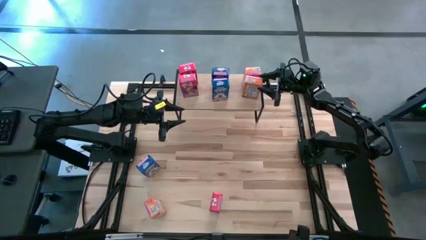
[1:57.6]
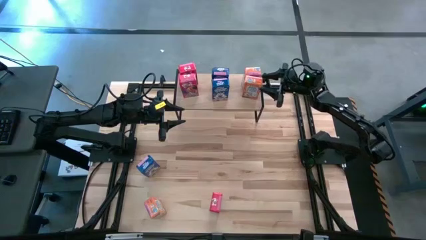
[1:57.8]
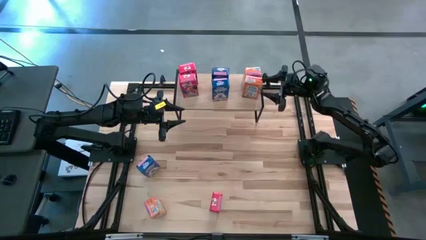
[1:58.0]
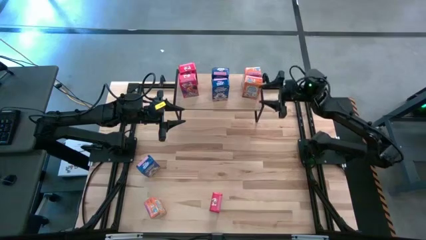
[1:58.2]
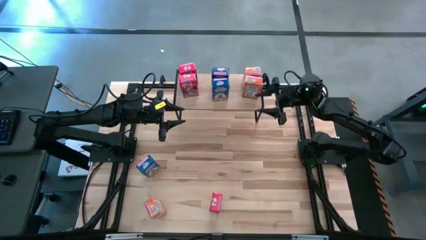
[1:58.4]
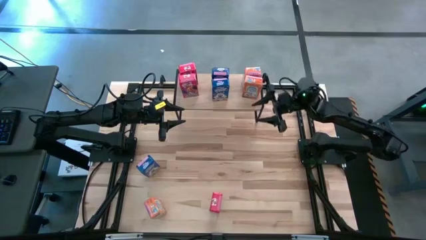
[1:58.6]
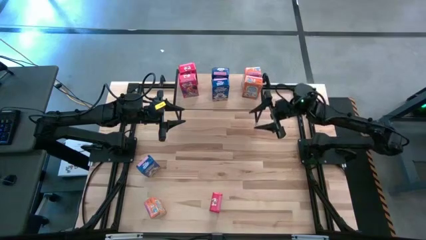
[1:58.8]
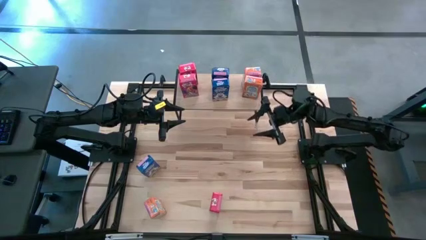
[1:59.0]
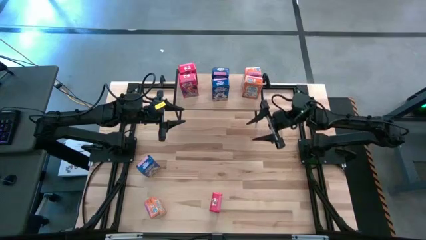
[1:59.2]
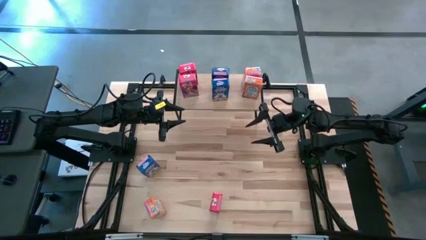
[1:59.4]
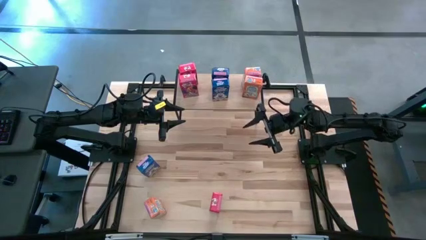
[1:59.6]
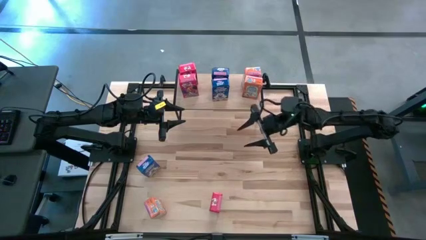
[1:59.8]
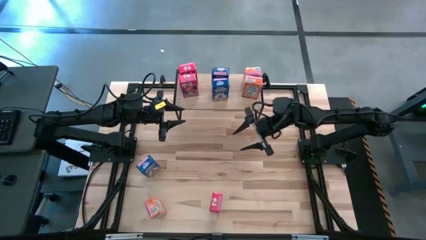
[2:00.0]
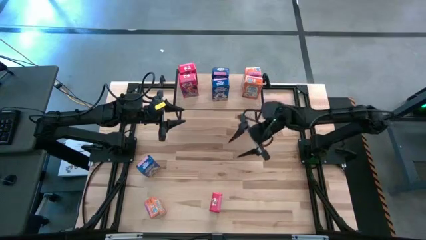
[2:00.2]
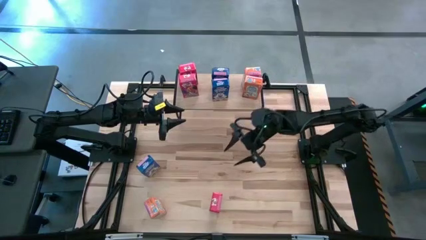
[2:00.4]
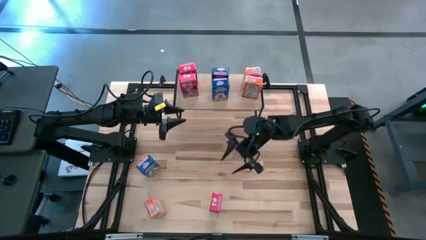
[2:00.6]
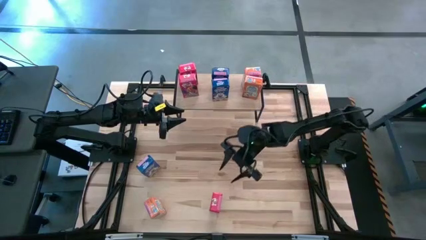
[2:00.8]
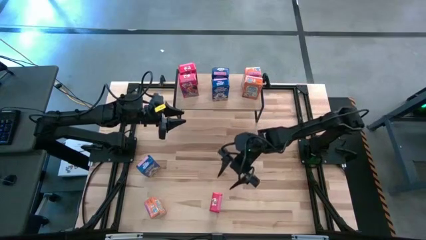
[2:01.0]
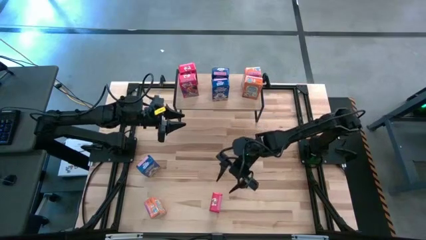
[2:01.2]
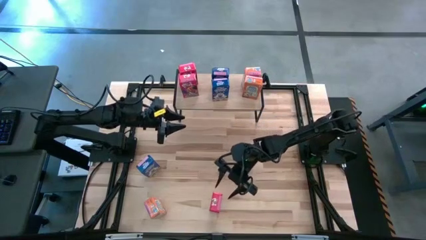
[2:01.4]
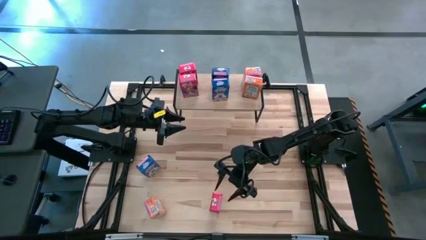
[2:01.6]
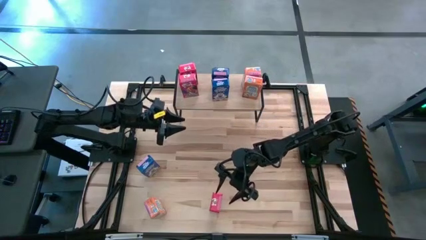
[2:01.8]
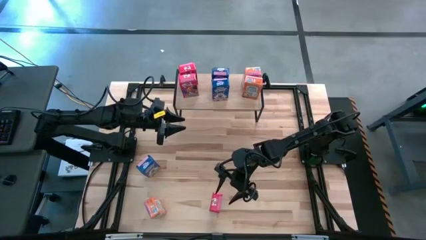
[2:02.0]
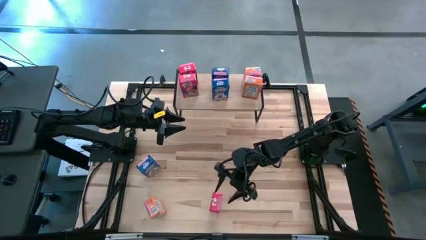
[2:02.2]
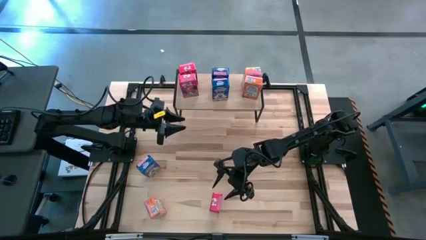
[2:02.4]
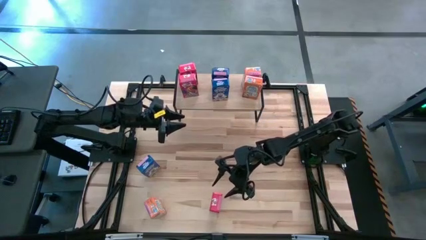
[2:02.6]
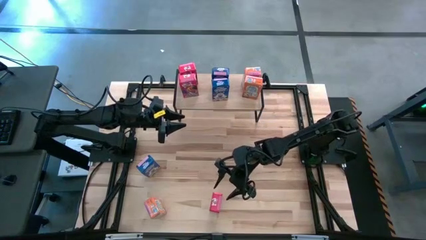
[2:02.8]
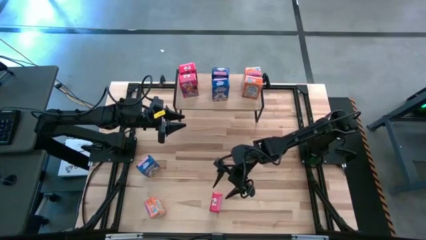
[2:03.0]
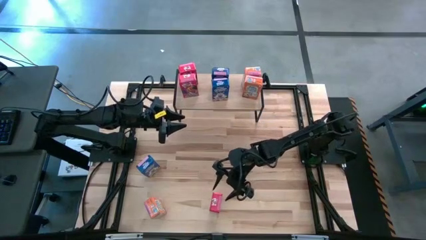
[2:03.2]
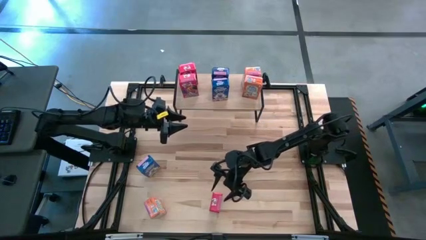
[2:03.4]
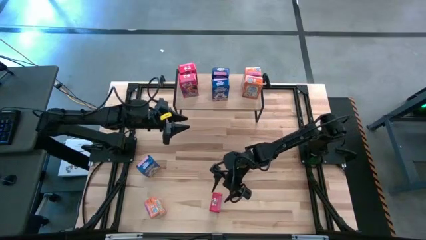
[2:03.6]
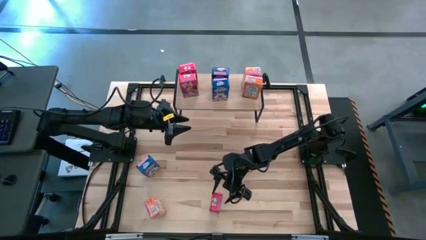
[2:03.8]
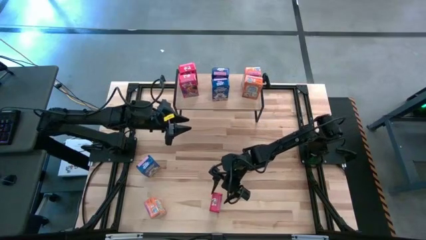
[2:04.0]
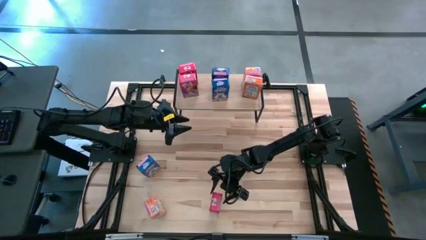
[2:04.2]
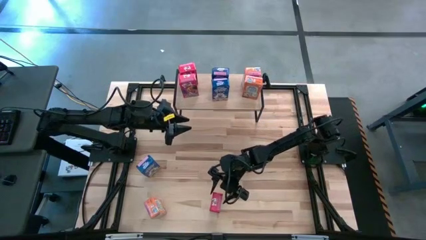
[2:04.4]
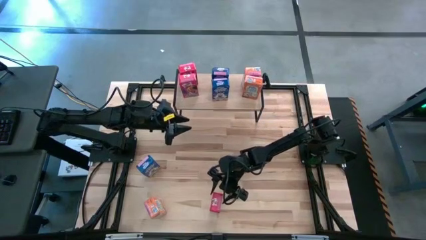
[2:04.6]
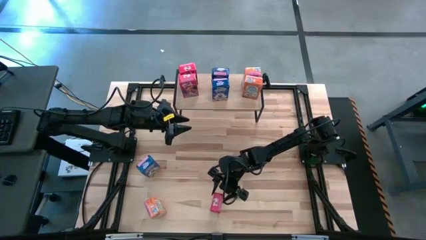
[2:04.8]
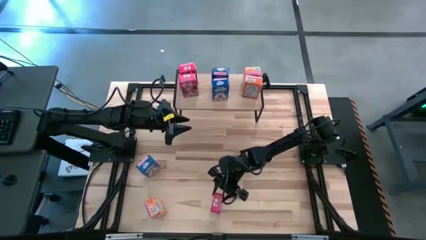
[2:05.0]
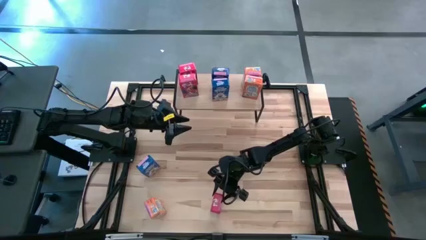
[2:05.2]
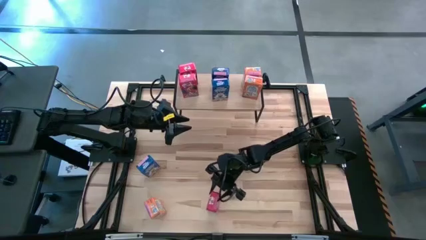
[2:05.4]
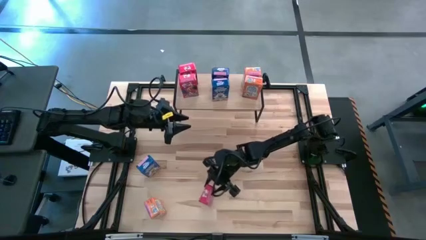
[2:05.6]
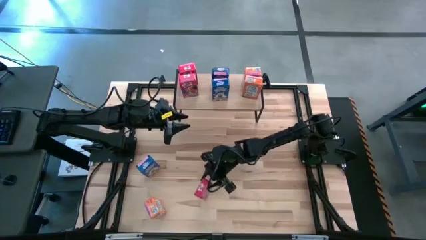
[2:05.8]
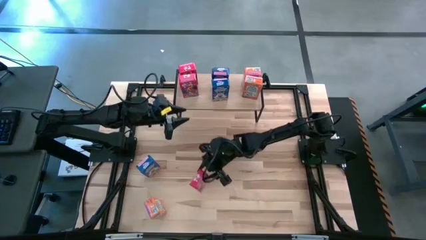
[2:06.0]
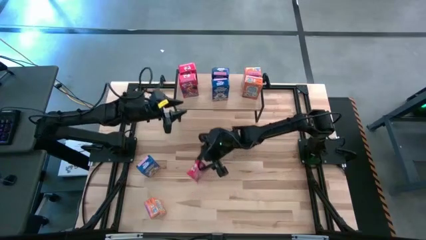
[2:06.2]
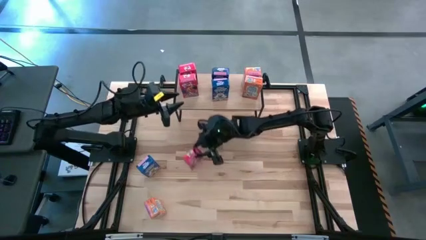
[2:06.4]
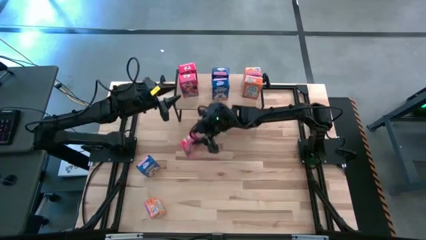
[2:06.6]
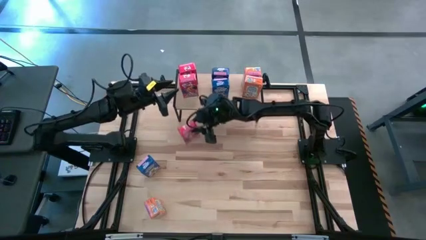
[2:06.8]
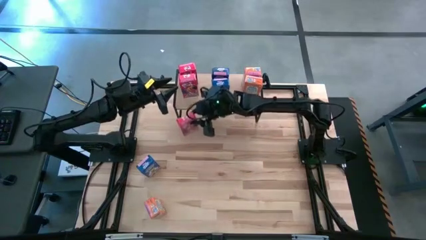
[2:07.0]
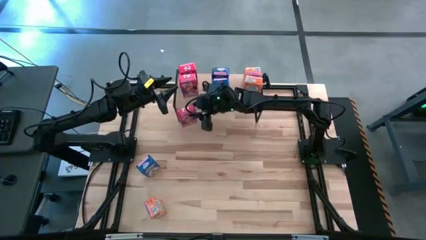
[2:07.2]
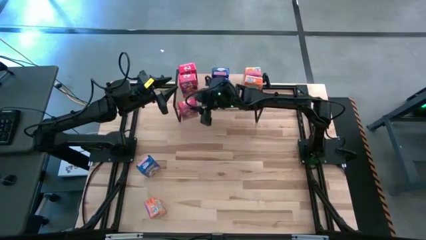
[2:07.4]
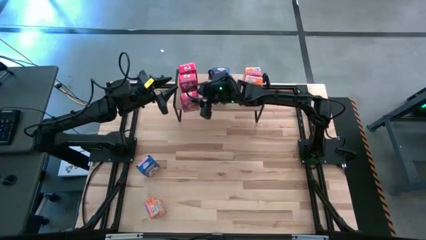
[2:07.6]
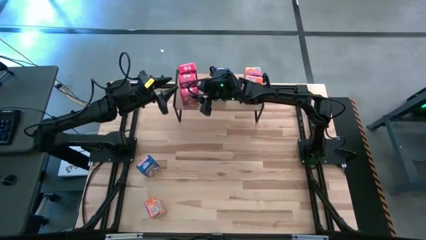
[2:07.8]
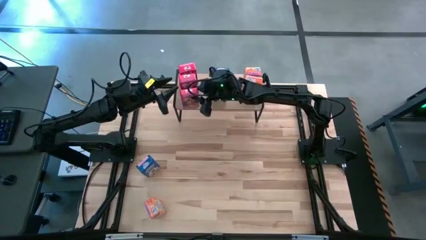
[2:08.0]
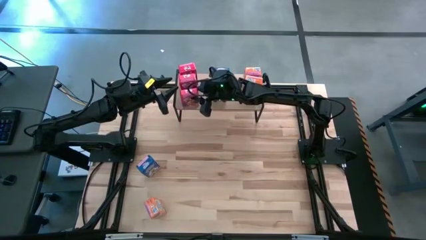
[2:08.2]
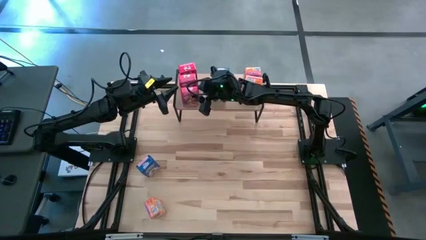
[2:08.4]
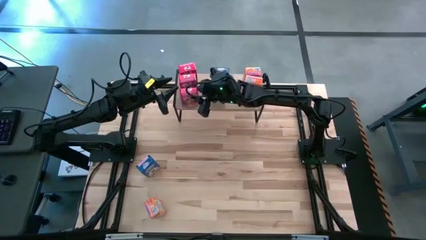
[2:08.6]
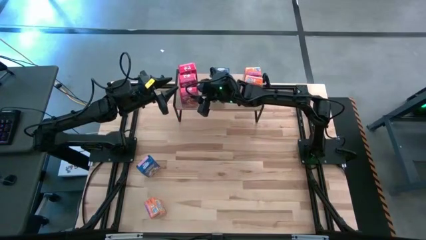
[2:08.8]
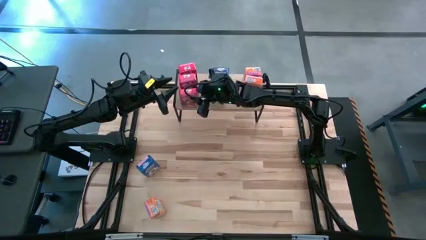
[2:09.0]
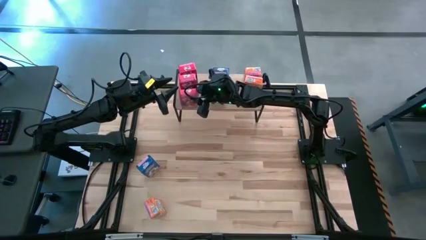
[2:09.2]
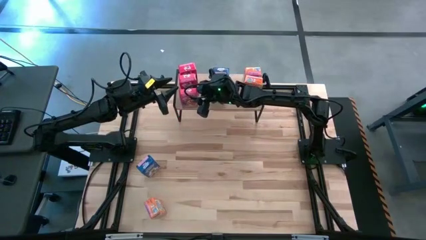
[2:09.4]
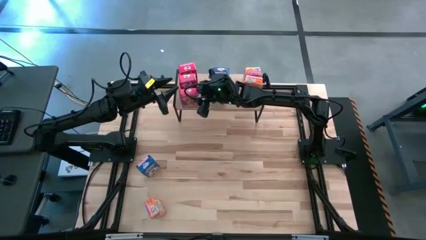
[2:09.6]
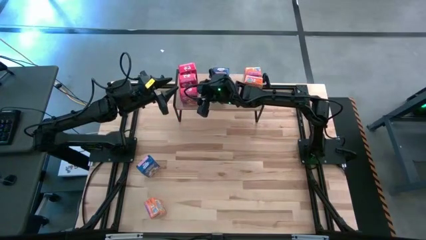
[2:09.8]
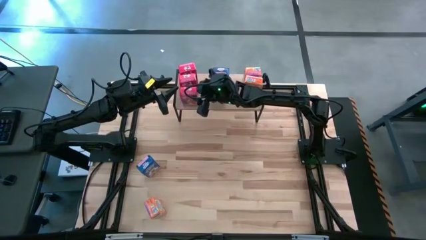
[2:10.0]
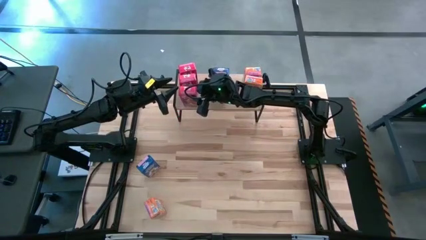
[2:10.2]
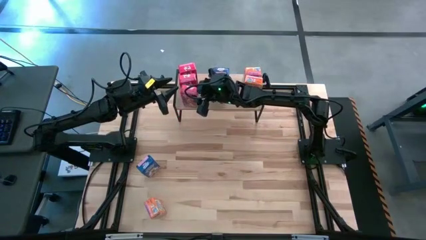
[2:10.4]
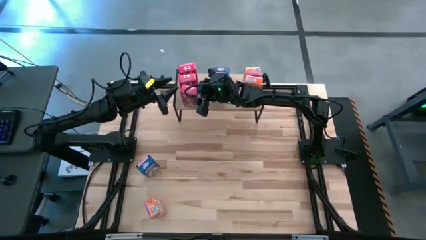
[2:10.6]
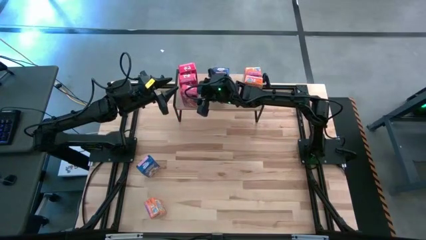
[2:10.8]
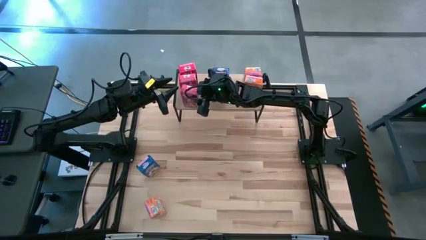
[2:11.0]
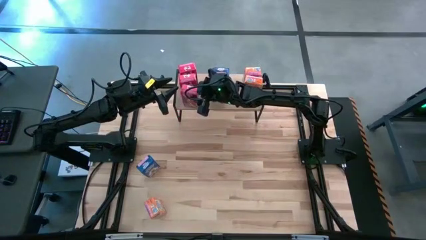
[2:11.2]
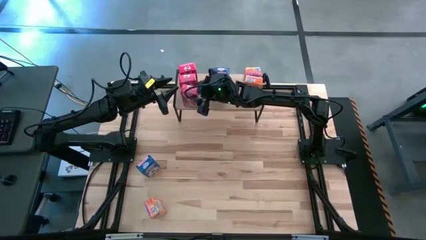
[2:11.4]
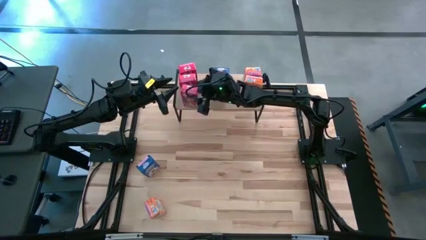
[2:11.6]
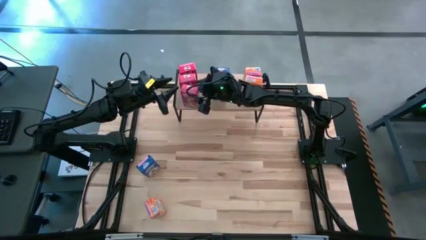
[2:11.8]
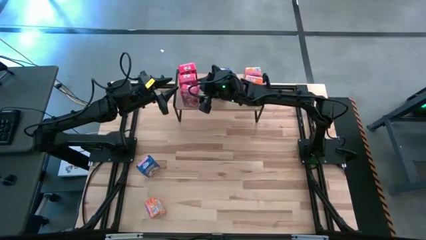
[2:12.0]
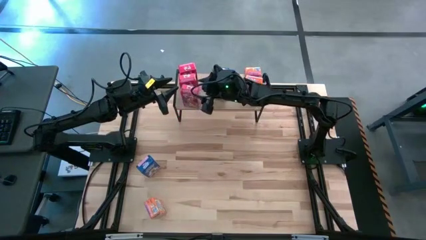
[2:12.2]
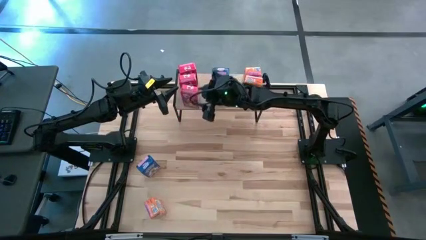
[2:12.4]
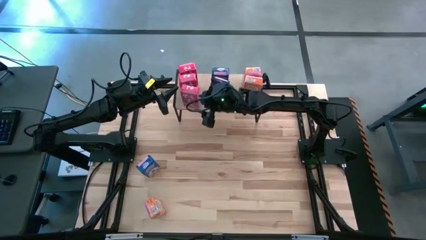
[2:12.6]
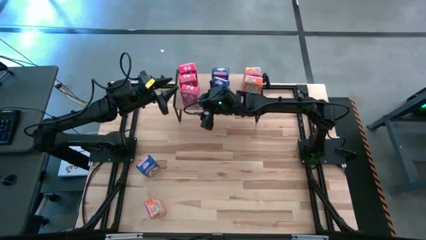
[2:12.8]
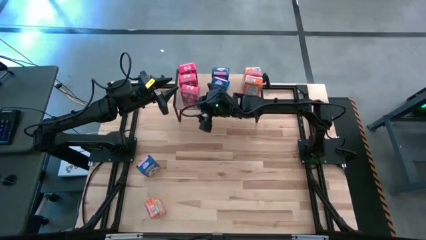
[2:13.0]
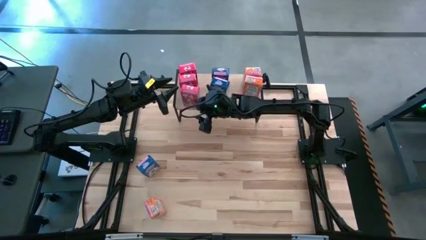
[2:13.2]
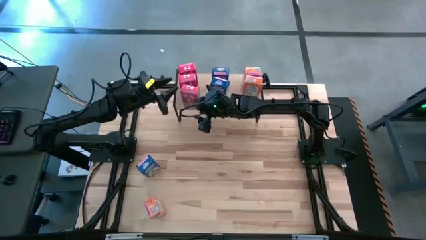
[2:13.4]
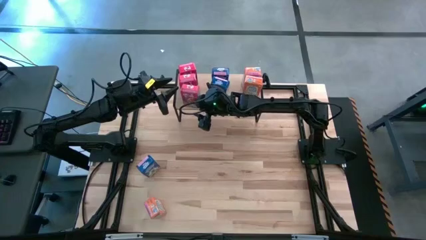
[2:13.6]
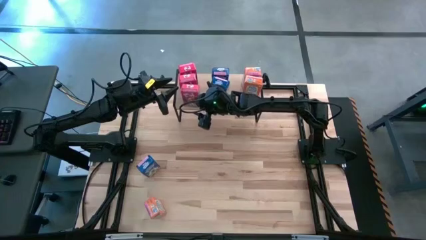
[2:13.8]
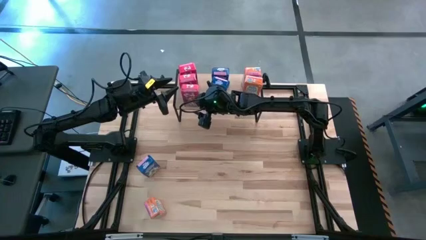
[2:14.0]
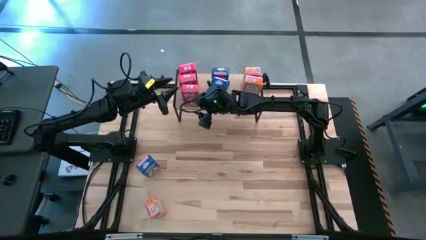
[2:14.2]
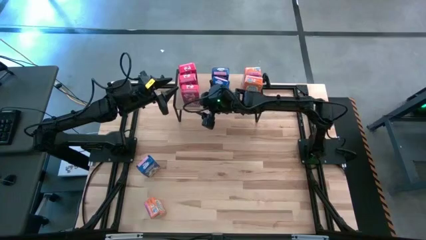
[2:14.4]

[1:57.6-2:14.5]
Task: Stack cereal on shelf
Put the red cereal box on the shelf aligned with the other red cereal boxes
